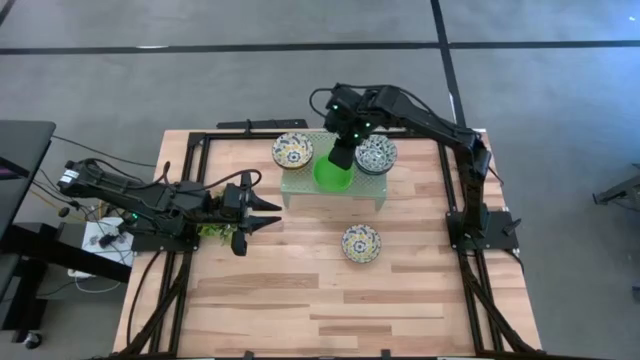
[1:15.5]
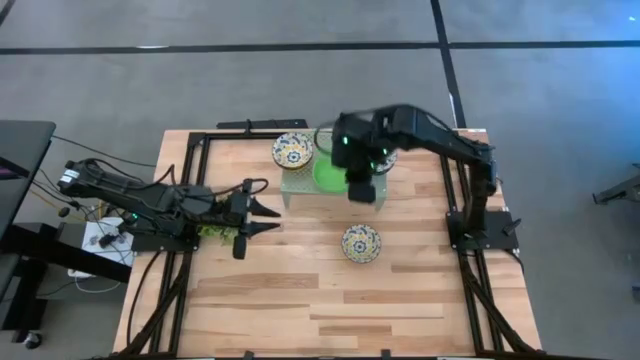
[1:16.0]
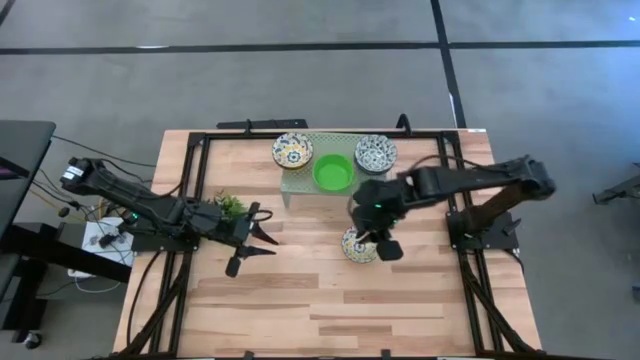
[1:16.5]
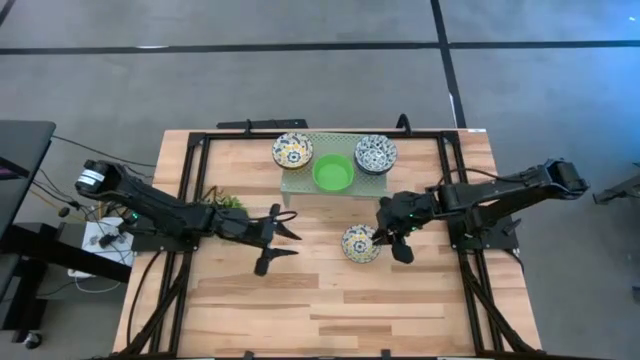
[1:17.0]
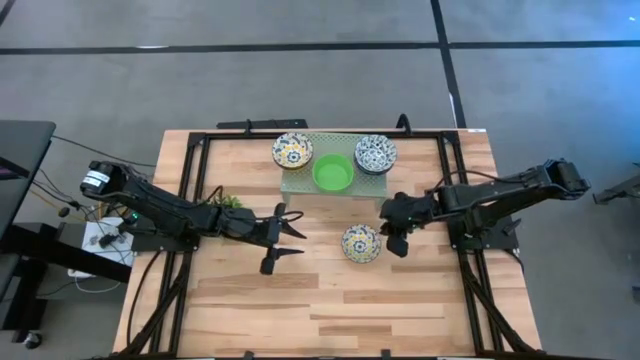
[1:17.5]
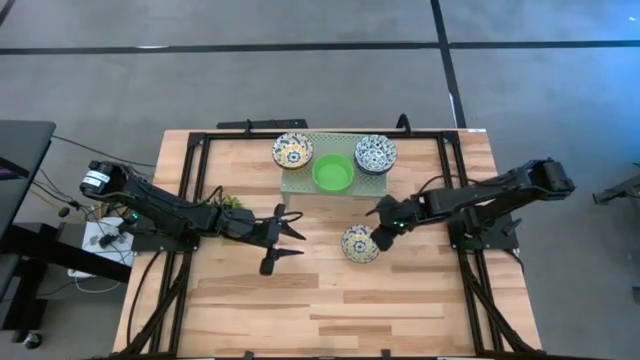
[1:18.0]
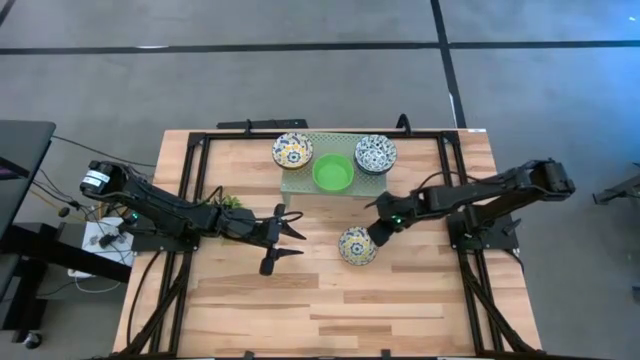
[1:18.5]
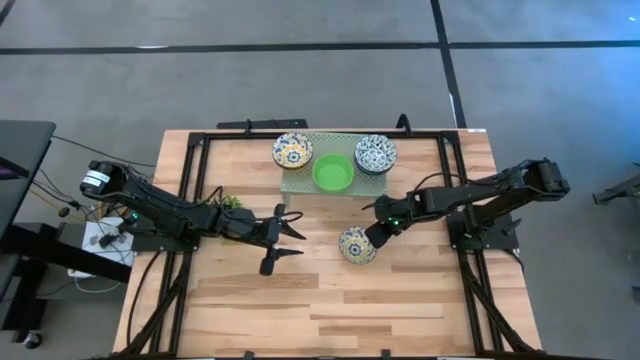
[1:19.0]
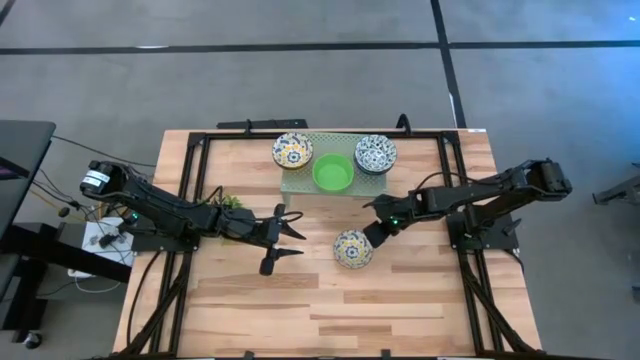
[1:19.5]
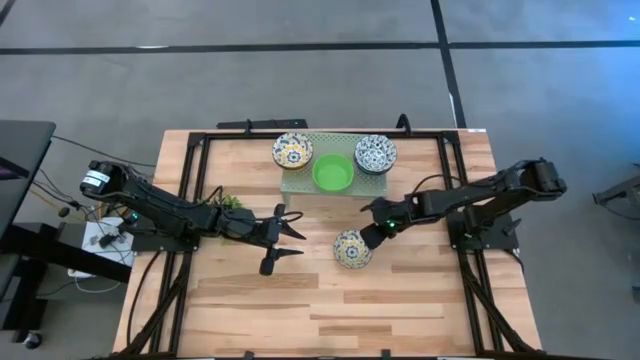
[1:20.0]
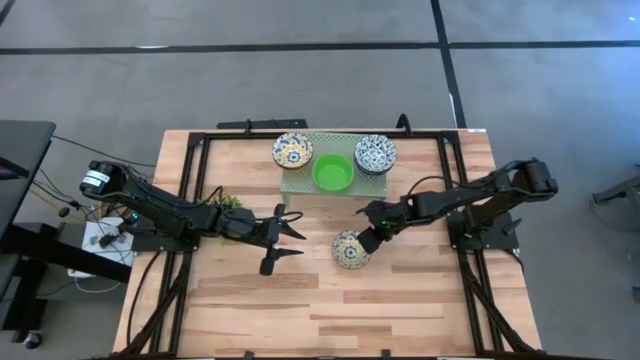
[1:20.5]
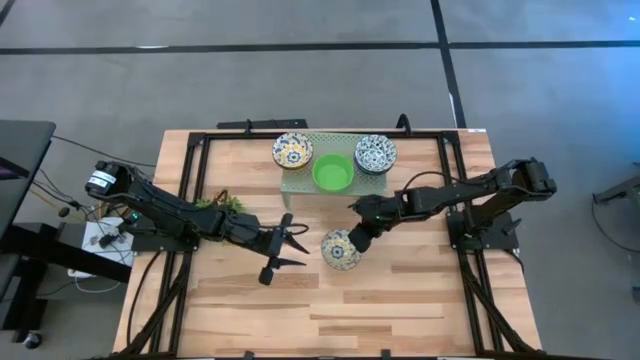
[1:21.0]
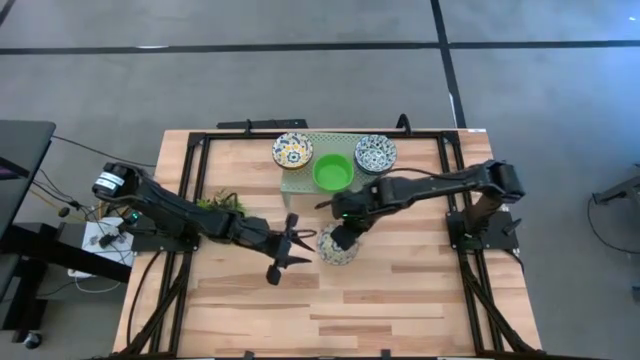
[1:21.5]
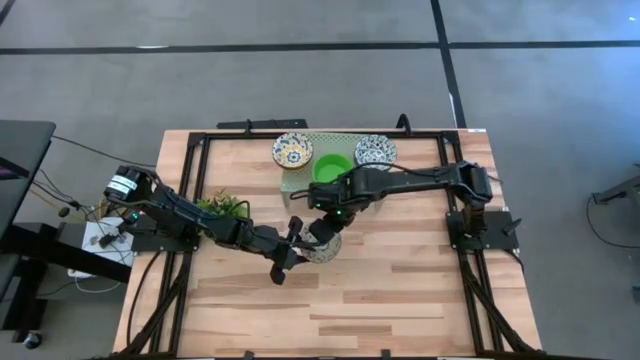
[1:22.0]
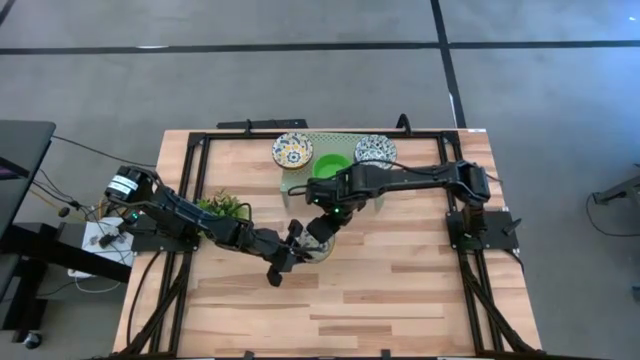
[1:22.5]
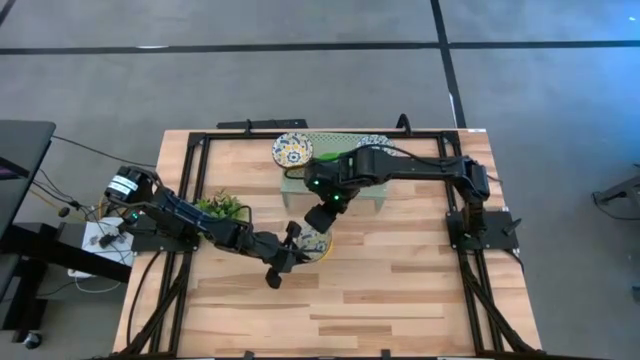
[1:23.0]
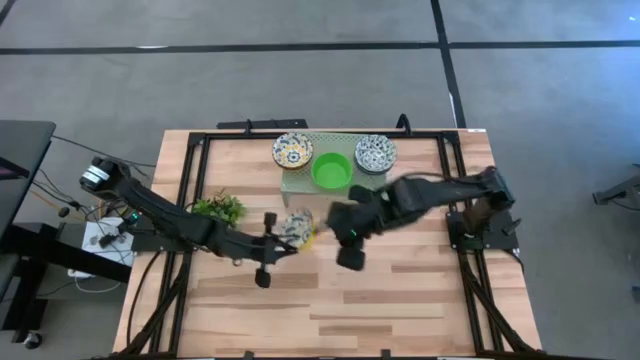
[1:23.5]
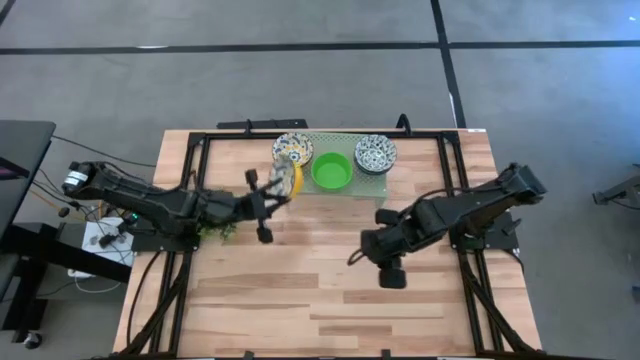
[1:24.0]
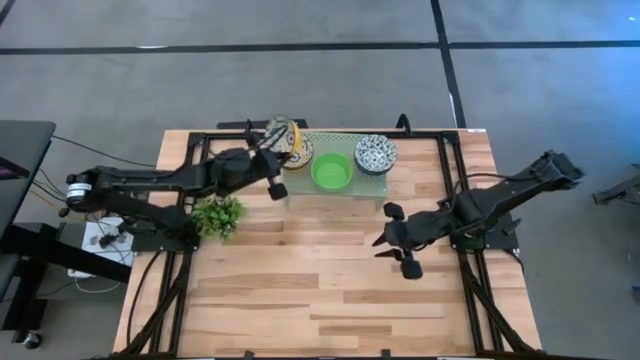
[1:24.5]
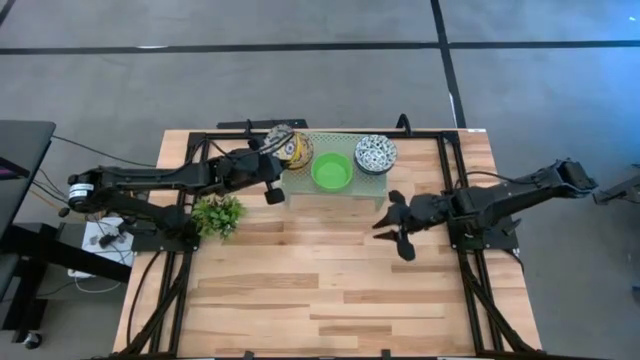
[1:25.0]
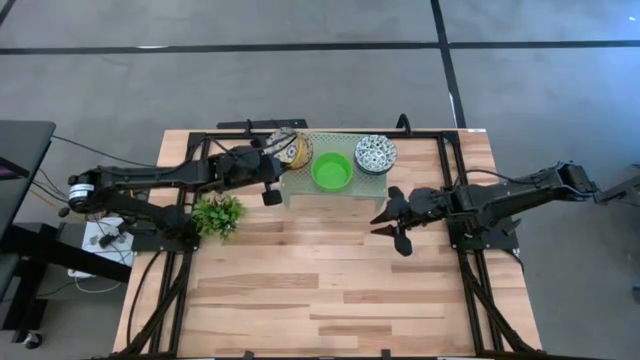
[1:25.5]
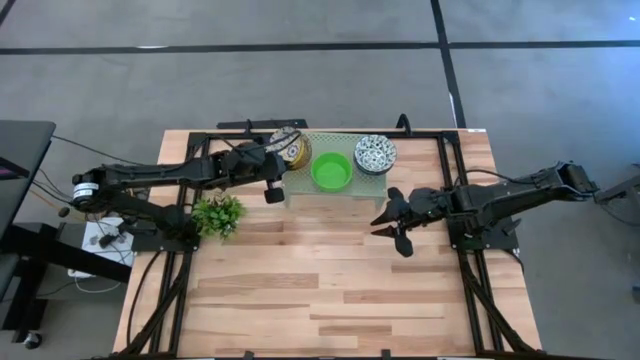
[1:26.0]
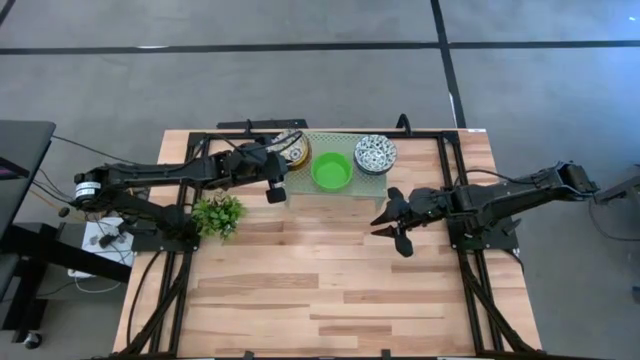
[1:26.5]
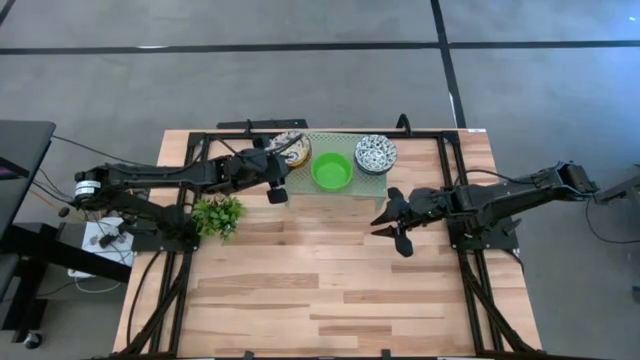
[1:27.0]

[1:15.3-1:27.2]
Task: Pick & Place Mini bowls
Stack the yellow bowl on the yellow bowl on the shelf

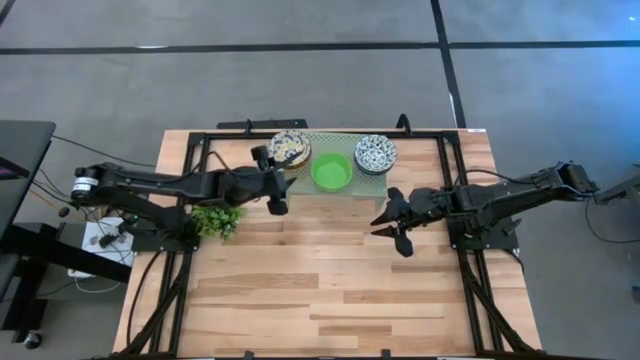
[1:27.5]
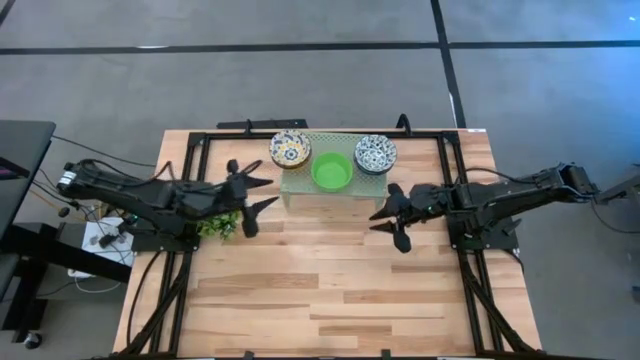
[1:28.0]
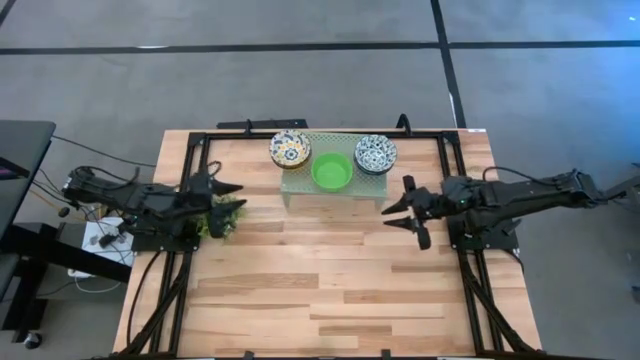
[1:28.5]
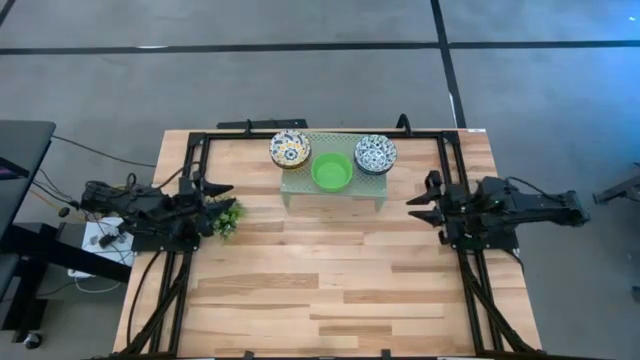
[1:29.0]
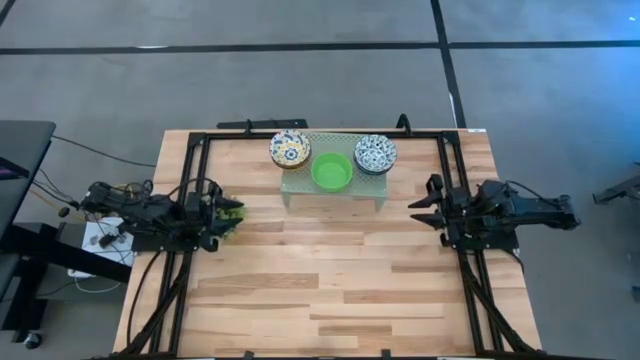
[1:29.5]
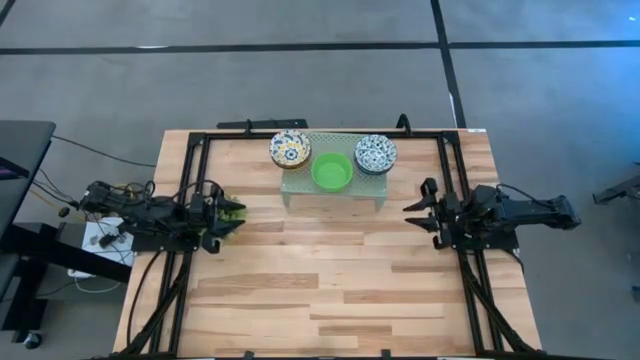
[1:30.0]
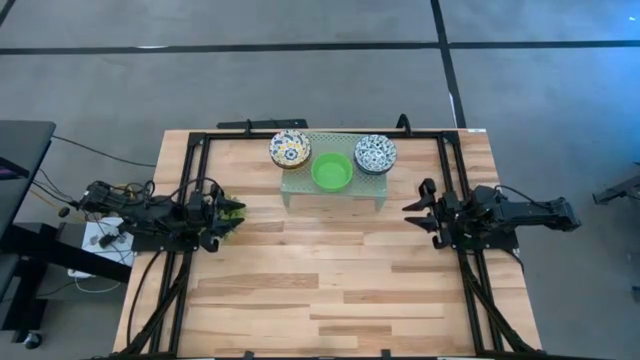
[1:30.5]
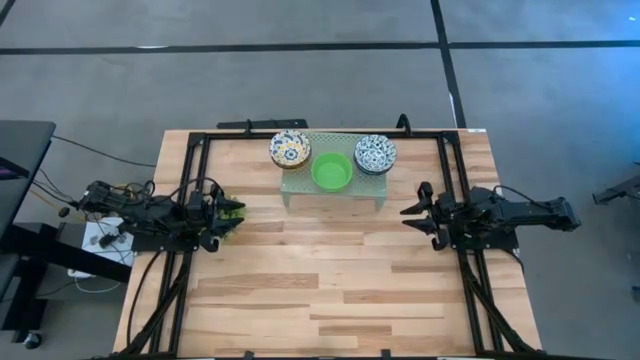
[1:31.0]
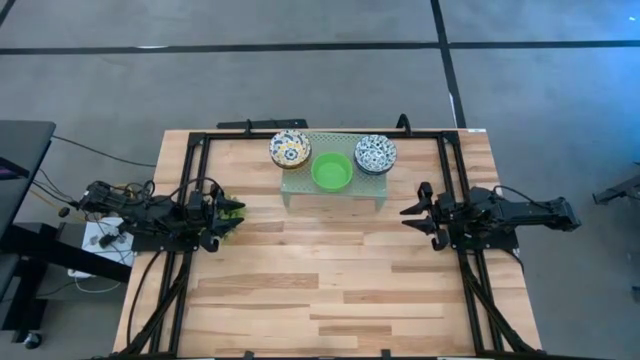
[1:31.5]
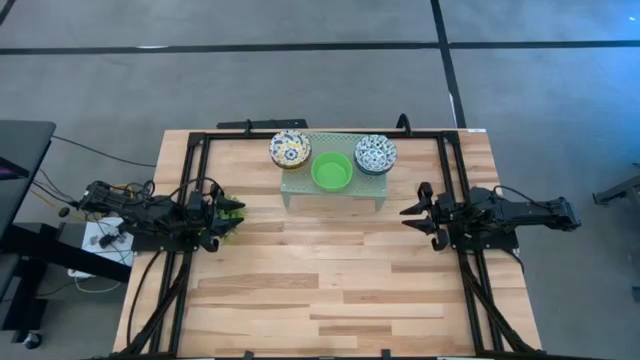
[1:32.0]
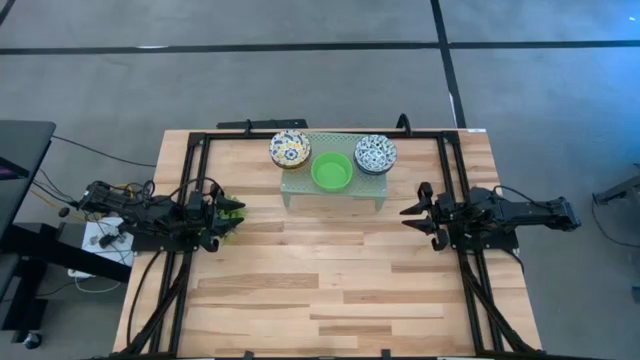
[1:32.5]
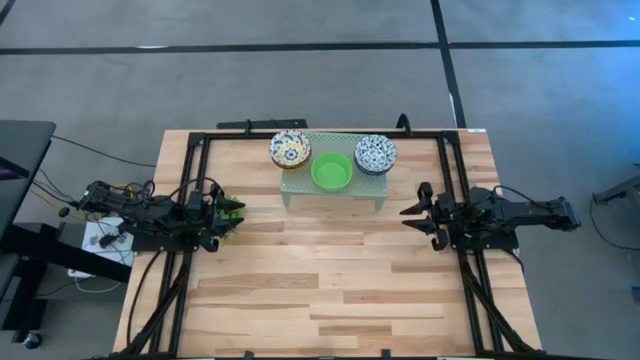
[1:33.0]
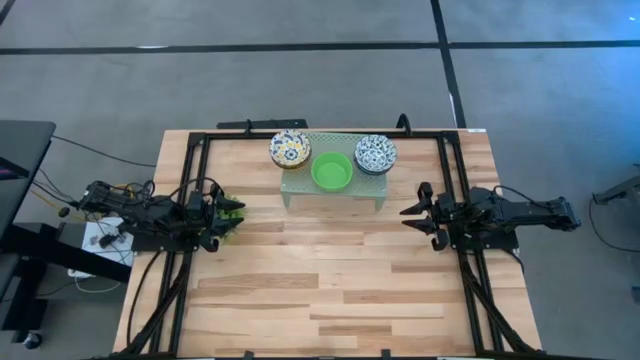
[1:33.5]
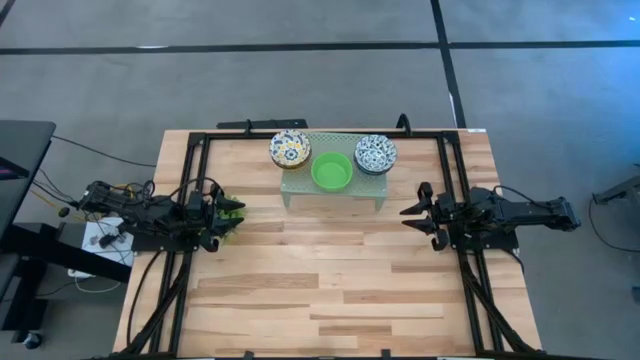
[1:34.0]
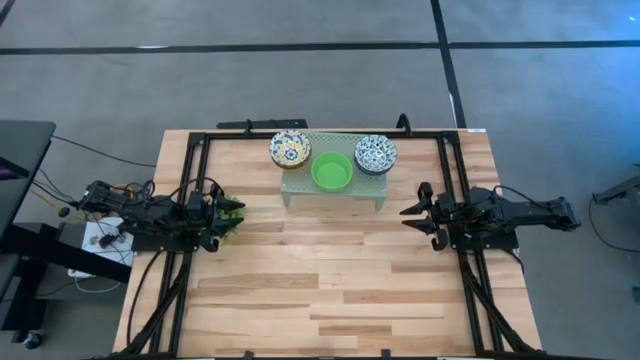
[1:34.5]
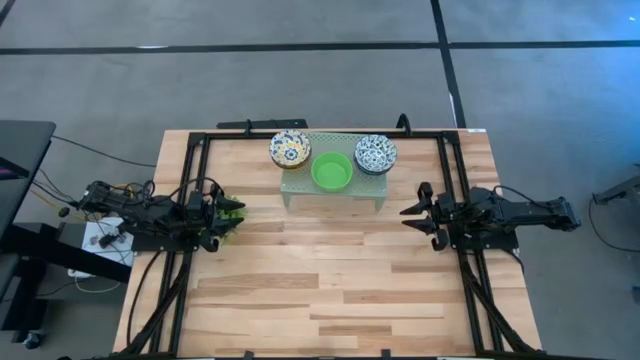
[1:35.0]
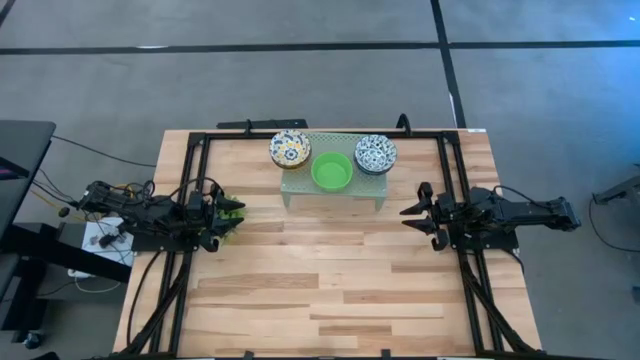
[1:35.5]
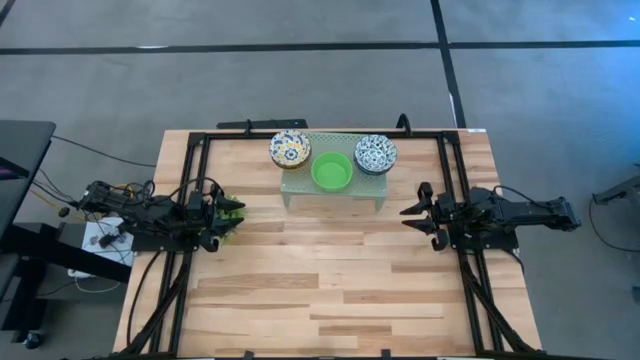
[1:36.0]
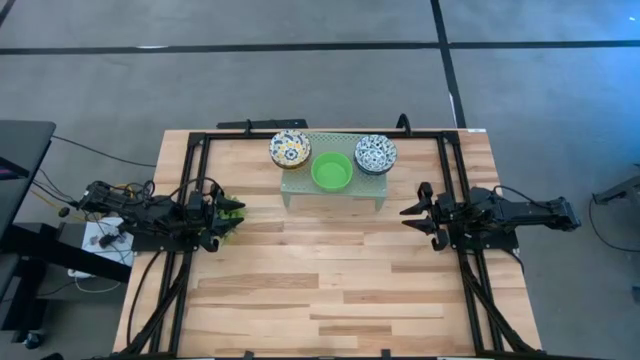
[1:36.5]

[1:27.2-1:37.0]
Return to Home Position
